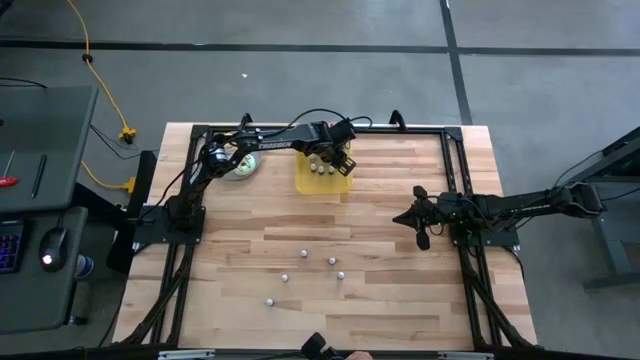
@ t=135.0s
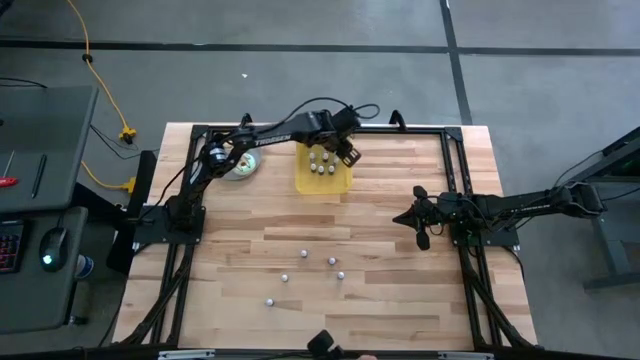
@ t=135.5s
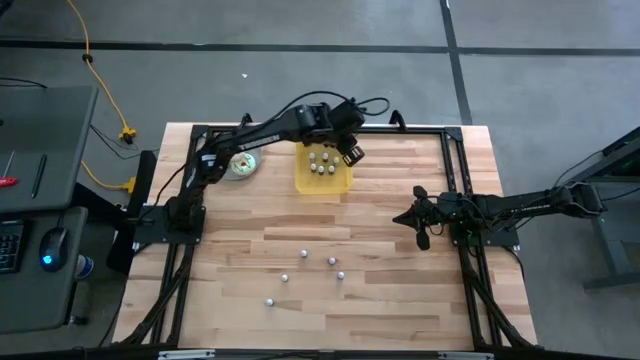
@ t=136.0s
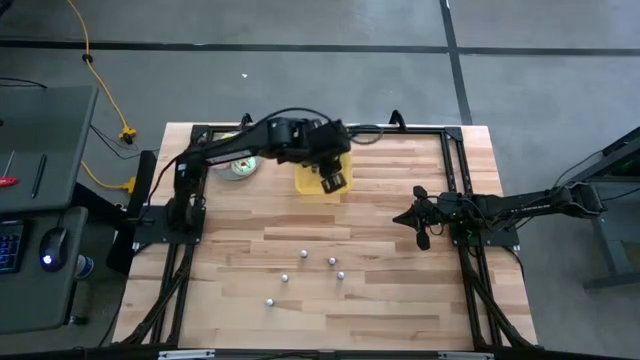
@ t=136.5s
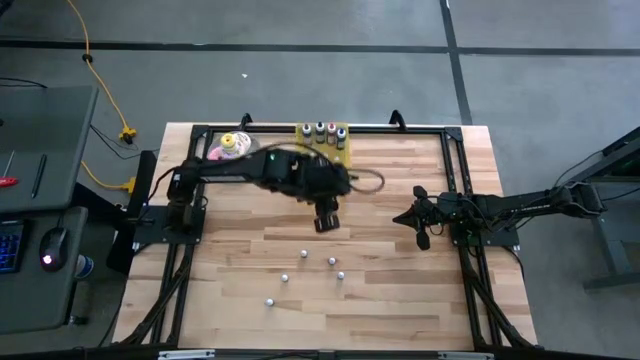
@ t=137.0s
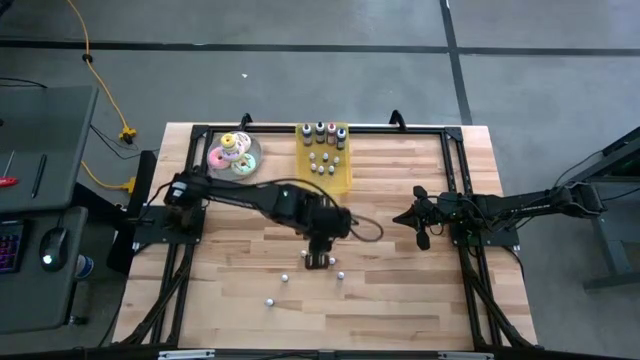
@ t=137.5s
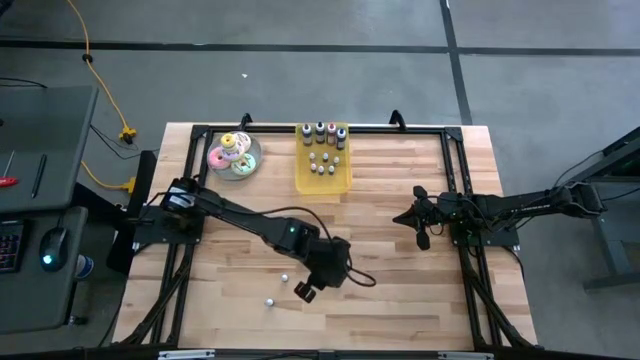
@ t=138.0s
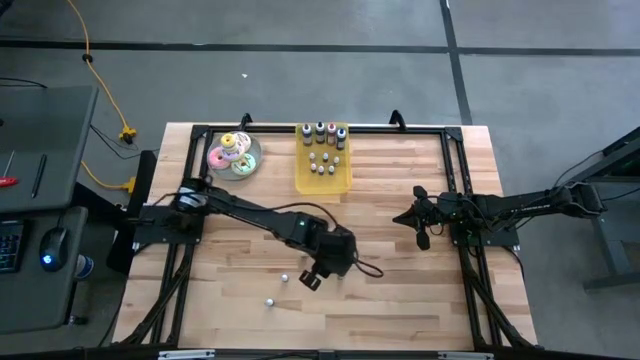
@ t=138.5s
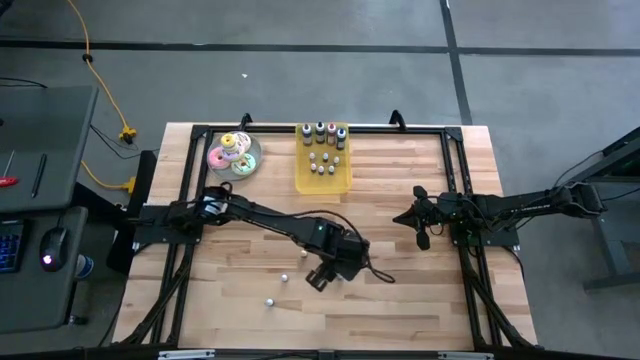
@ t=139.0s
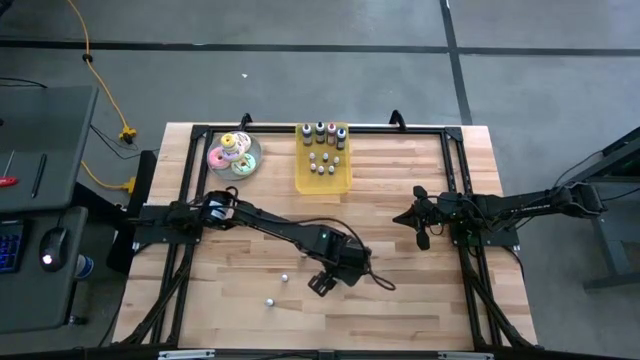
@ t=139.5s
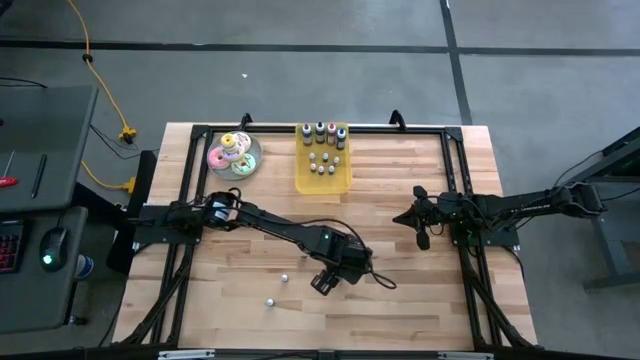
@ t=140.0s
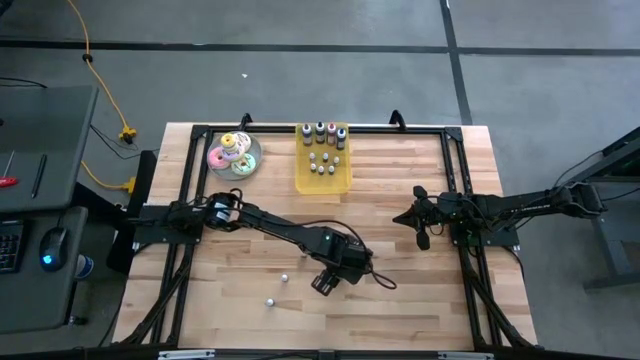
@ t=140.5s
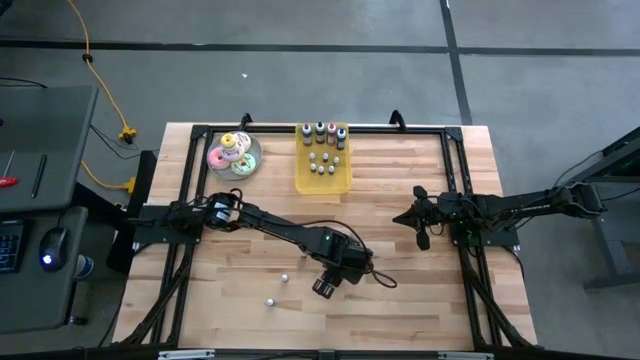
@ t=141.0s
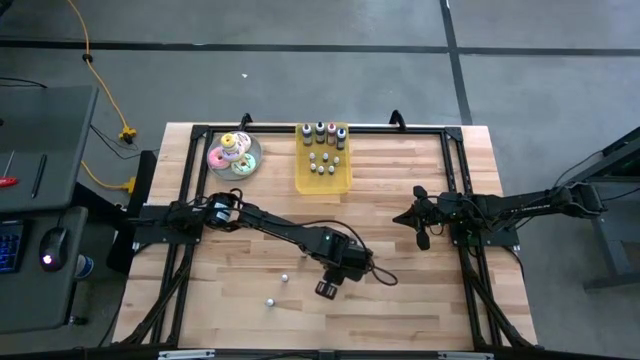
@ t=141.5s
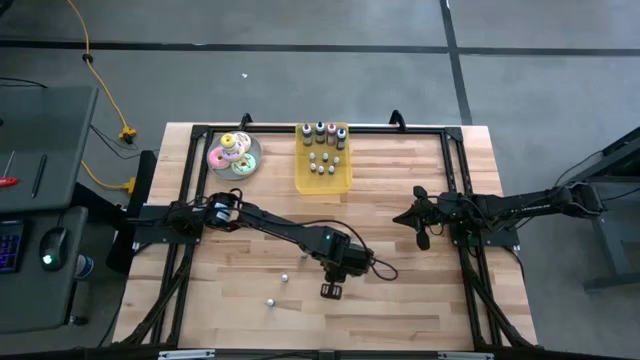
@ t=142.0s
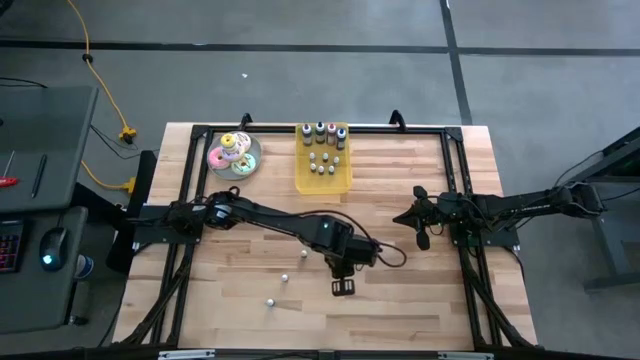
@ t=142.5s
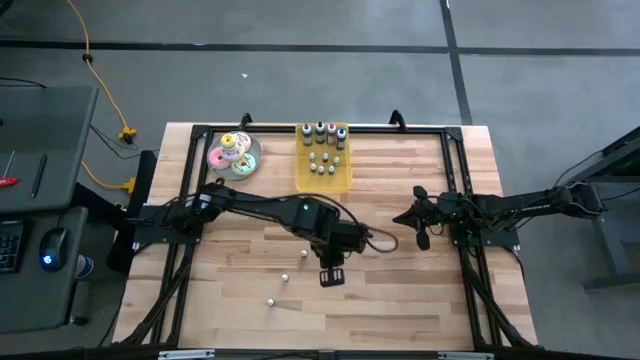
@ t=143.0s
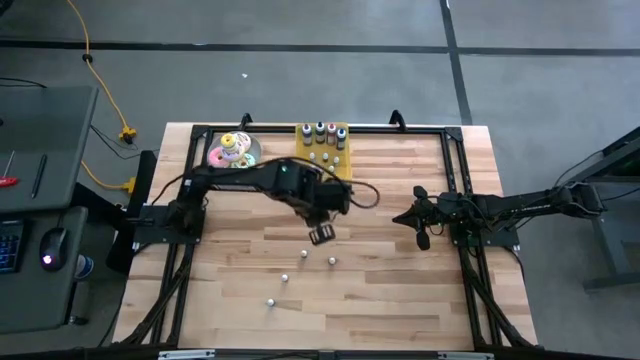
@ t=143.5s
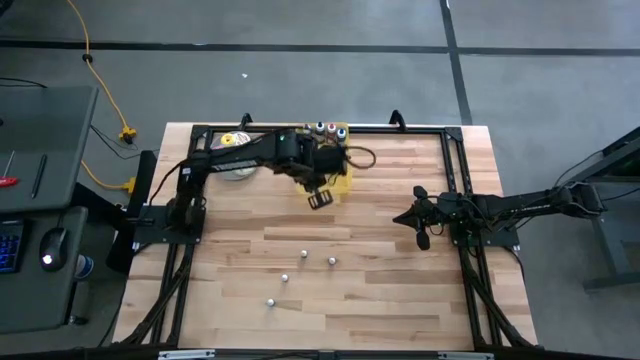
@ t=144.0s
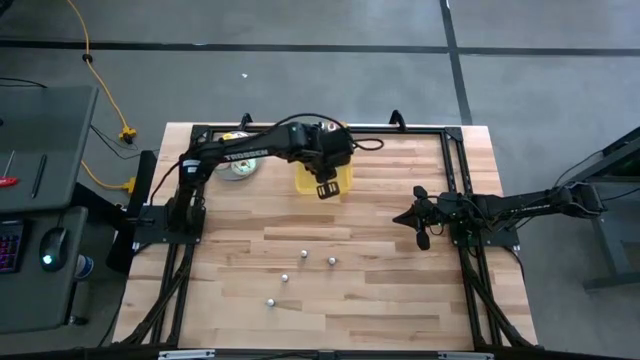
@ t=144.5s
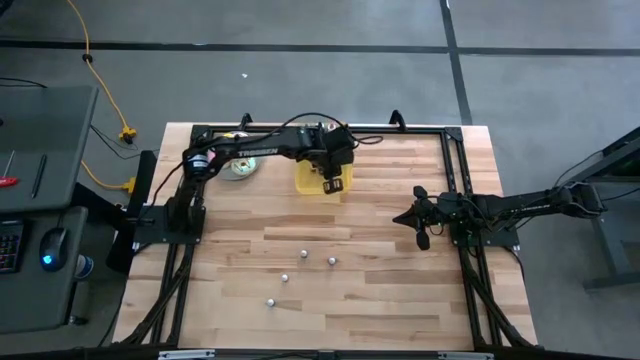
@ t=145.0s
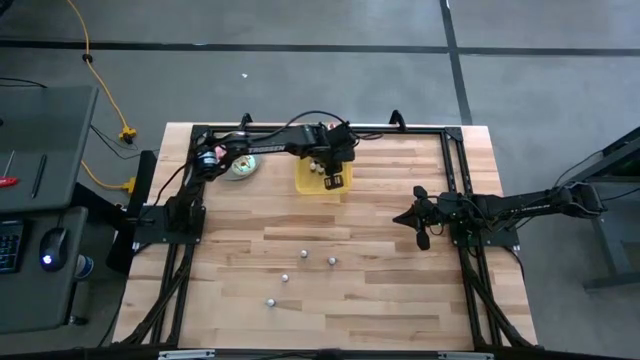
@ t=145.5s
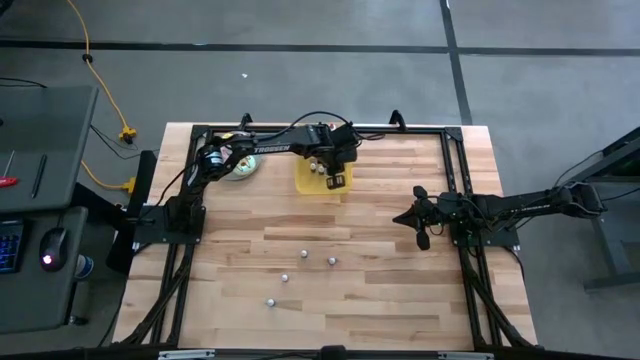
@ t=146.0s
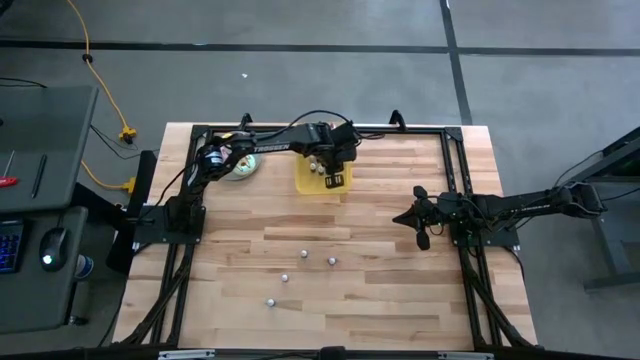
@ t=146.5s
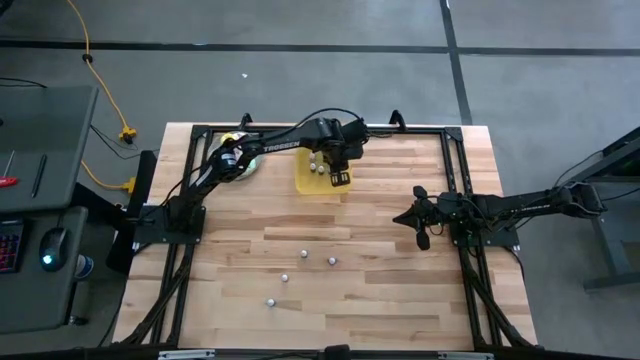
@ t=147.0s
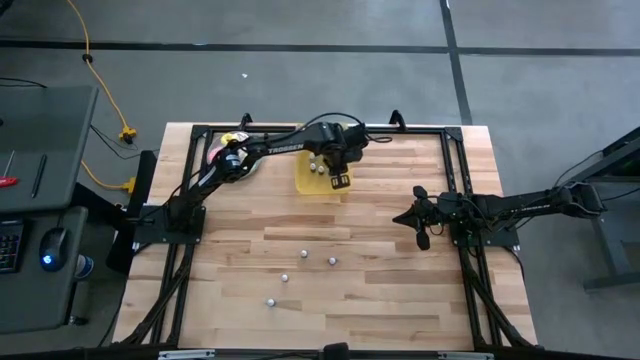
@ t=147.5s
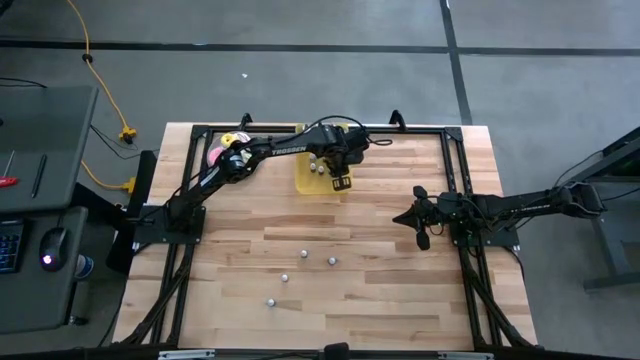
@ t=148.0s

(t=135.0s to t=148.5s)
Task: Pick & Place food coloring
Put the small black food coloring bottle into the yellow bin

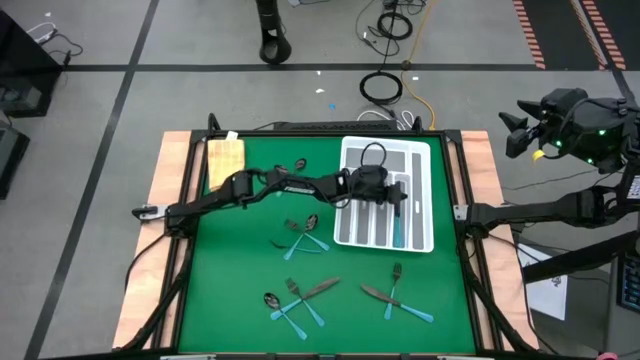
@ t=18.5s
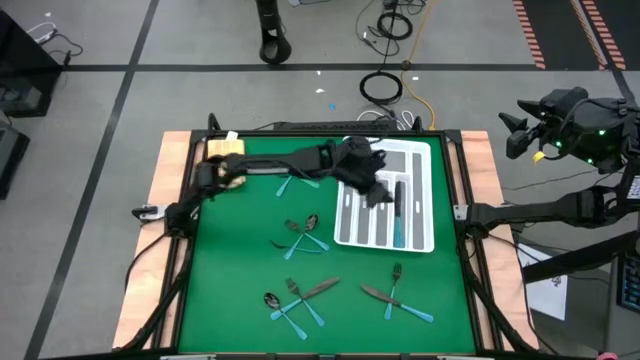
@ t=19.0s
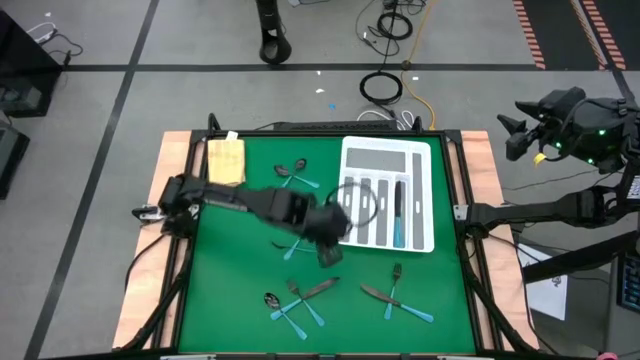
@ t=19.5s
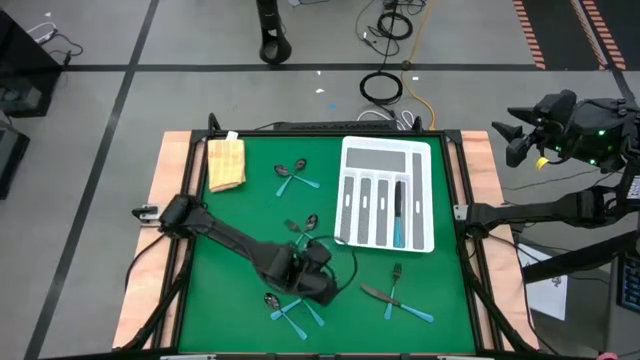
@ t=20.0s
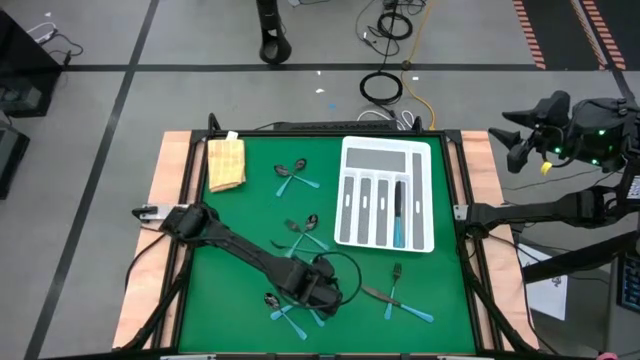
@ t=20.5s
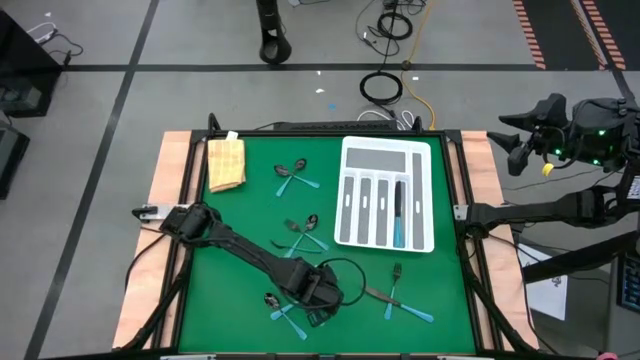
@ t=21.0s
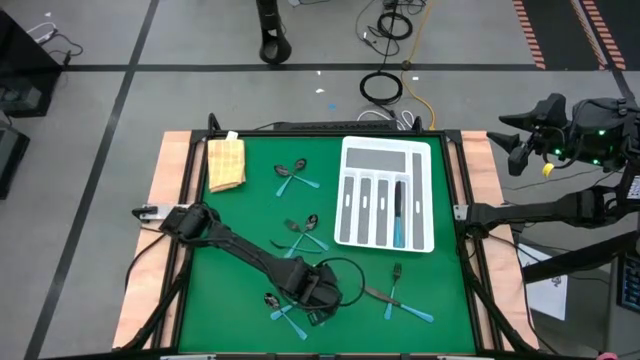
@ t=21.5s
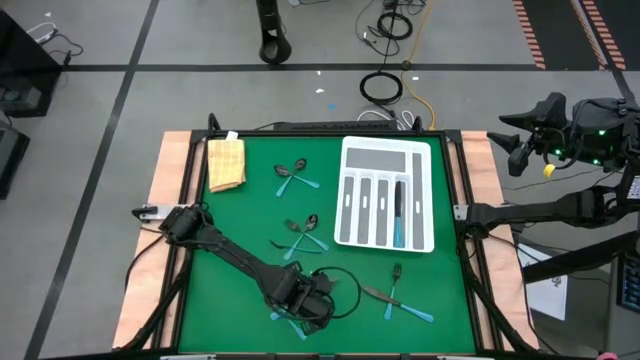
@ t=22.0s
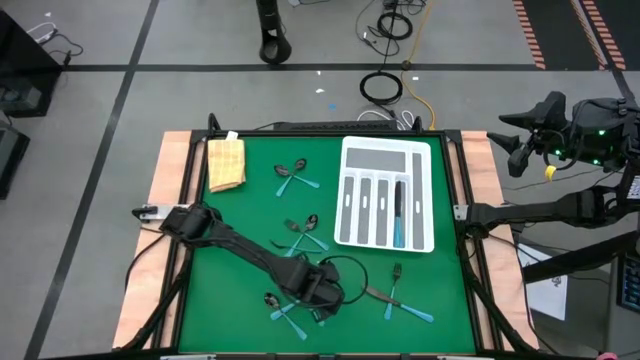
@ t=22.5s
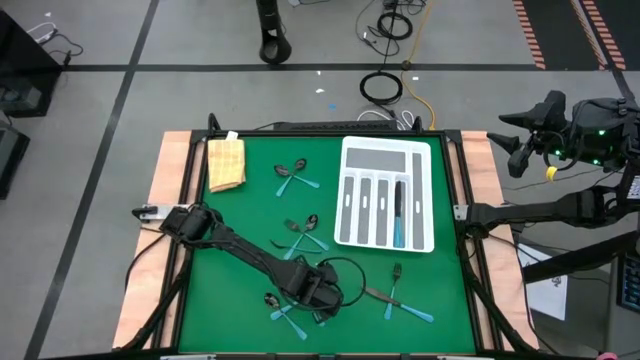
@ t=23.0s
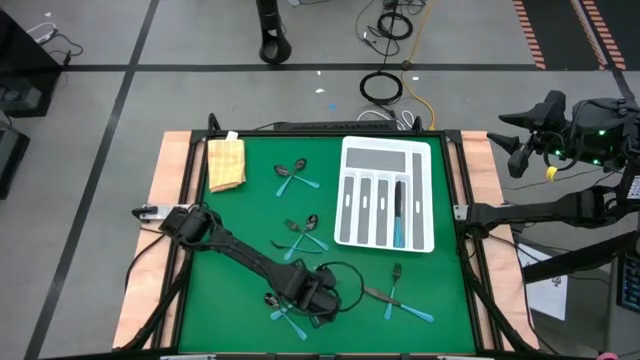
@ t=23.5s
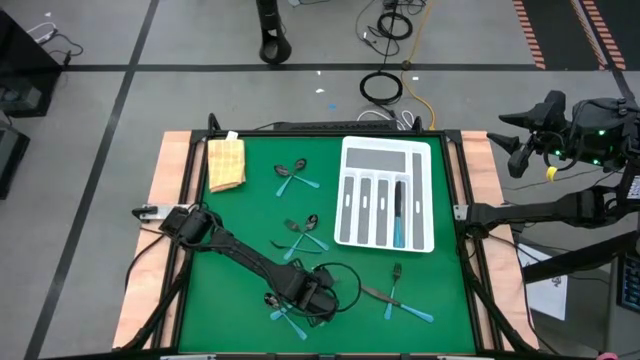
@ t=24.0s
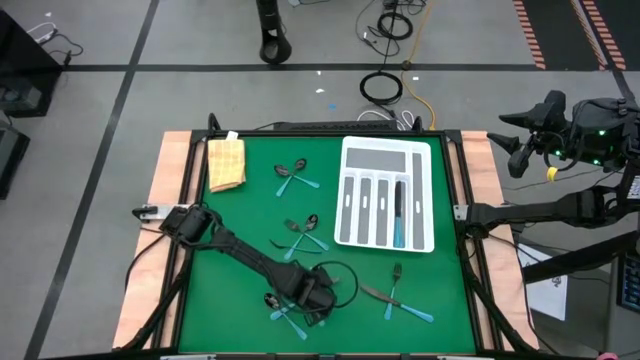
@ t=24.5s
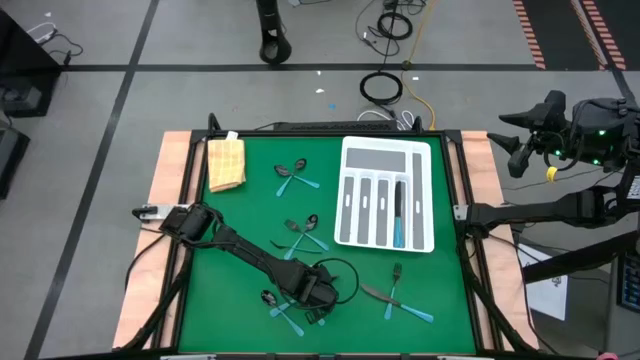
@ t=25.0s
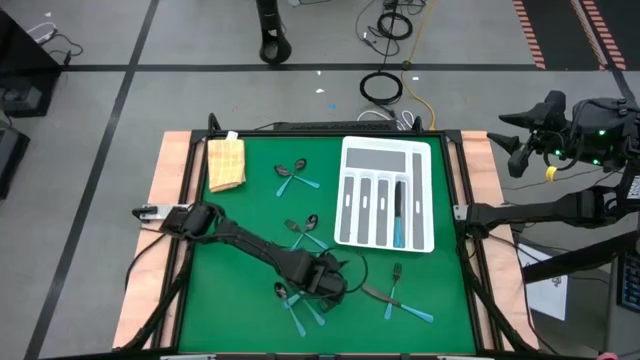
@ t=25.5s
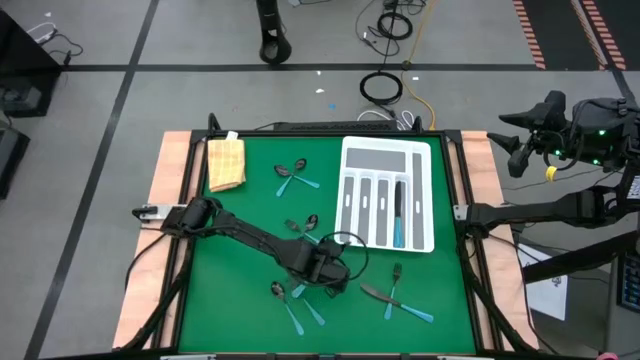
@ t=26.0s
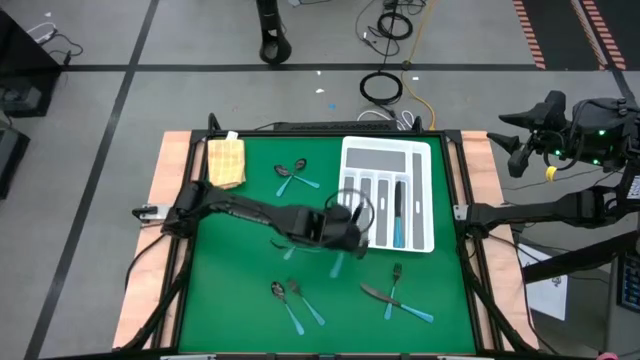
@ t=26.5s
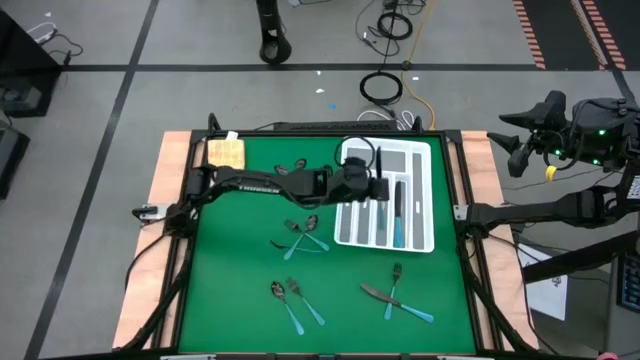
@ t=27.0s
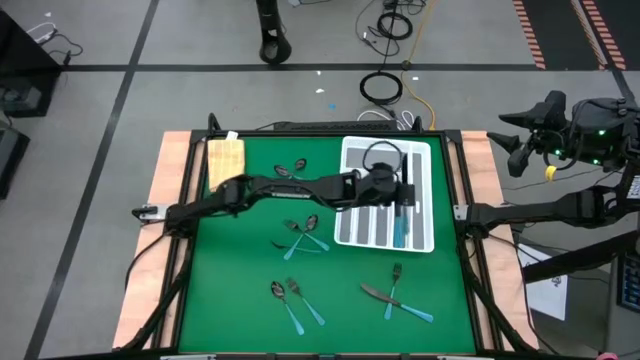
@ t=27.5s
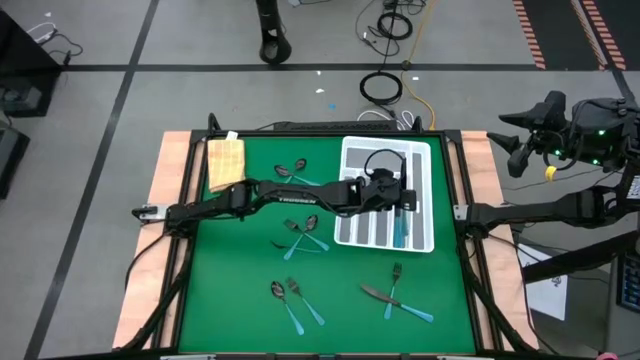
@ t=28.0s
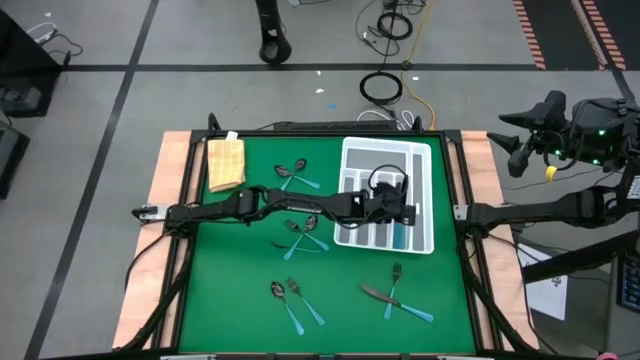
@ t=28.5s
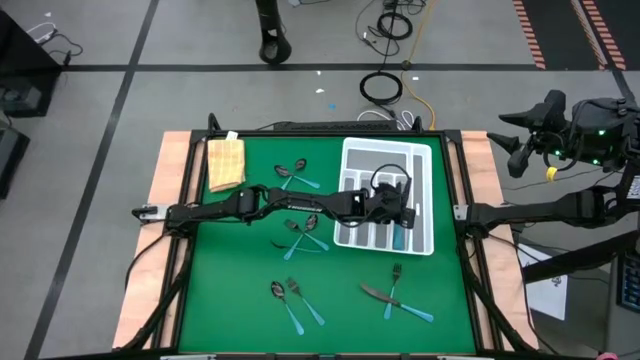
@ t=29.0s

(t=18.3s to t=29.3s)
Task: Sort silverware
Put the blue table knife into the silverware tray with the other blue table knives
